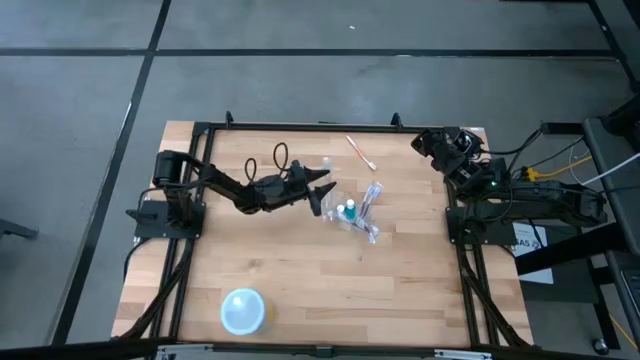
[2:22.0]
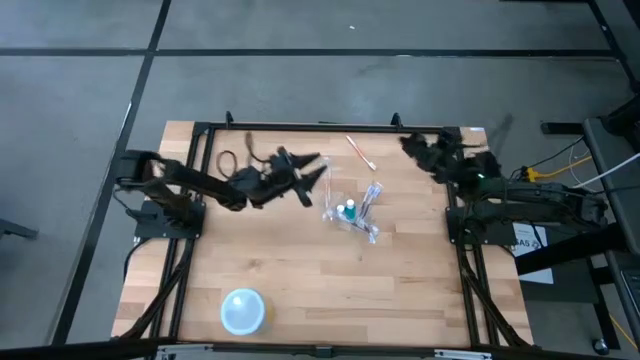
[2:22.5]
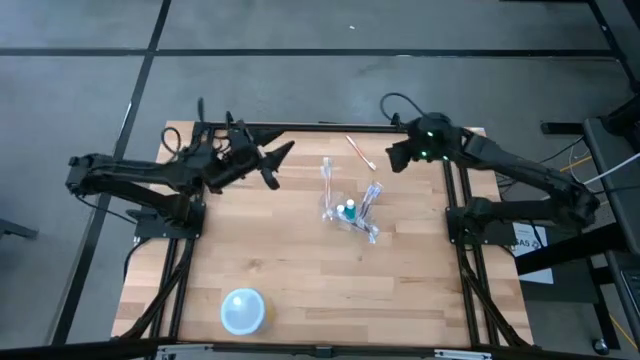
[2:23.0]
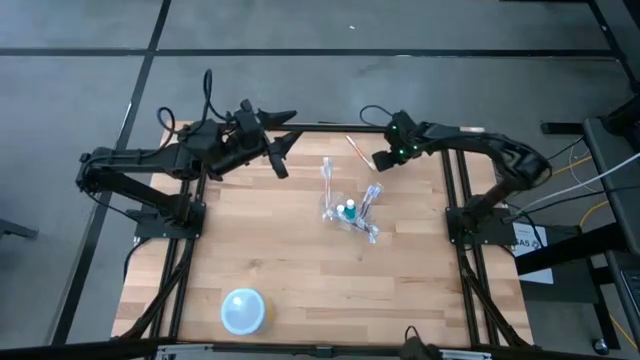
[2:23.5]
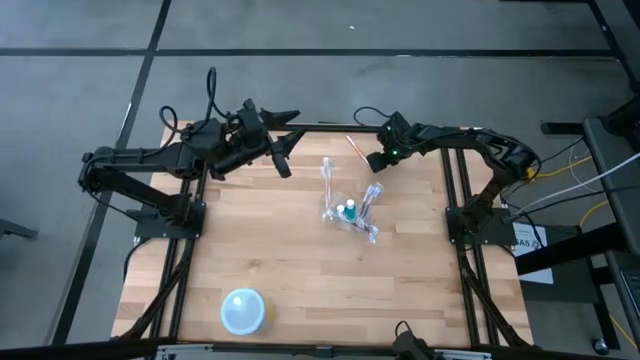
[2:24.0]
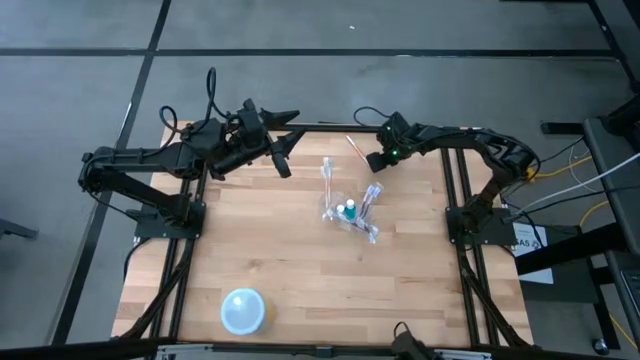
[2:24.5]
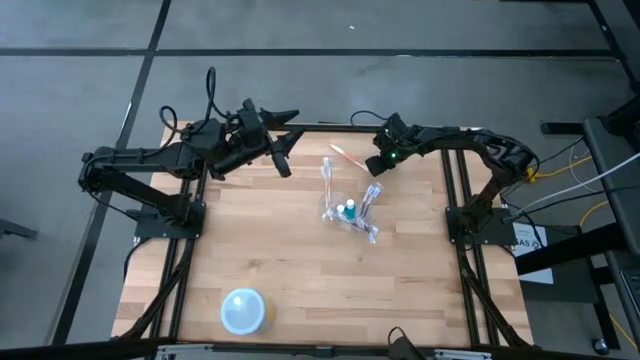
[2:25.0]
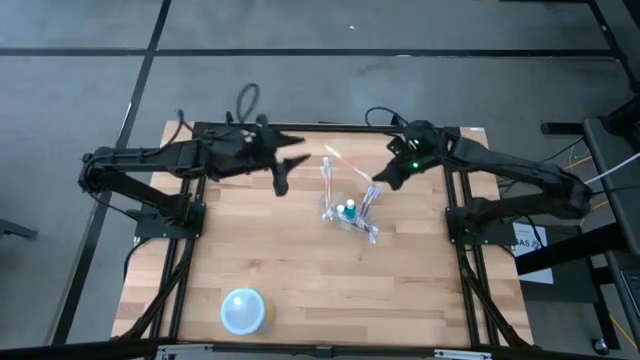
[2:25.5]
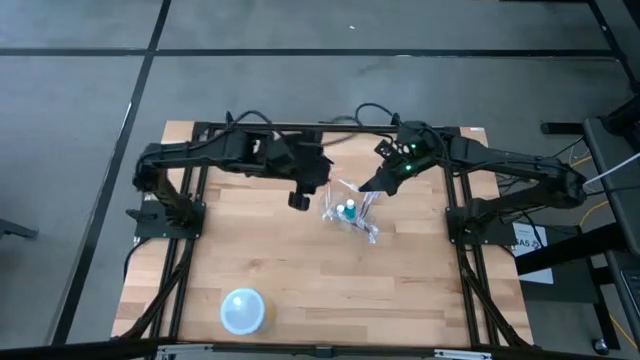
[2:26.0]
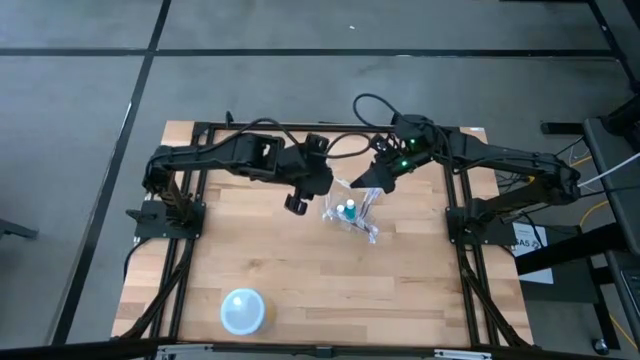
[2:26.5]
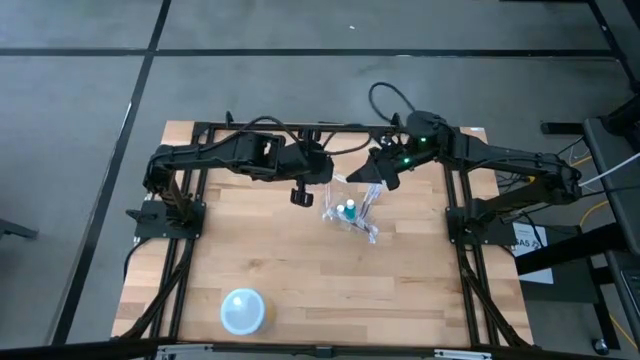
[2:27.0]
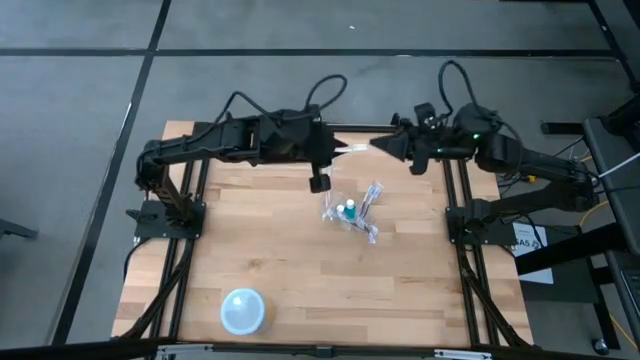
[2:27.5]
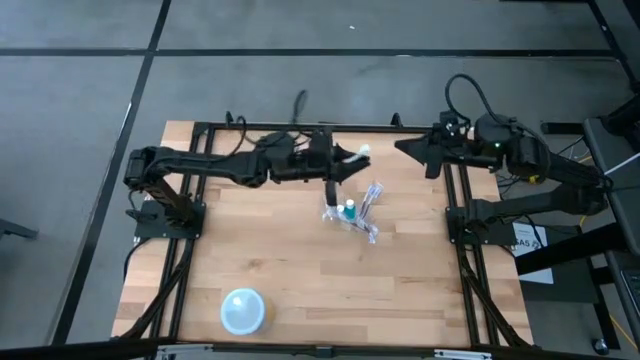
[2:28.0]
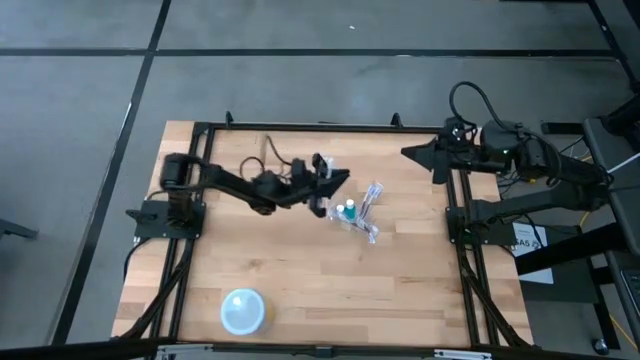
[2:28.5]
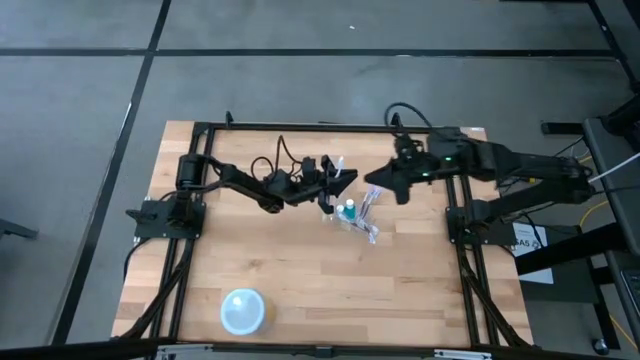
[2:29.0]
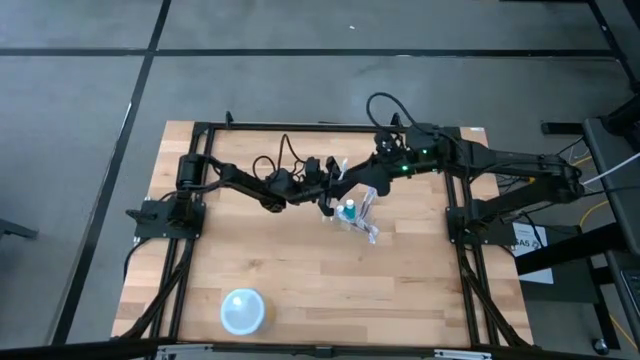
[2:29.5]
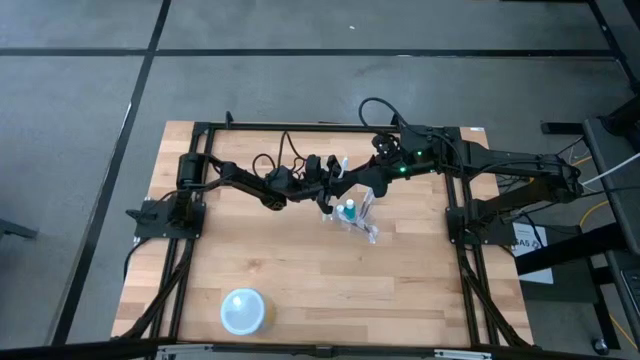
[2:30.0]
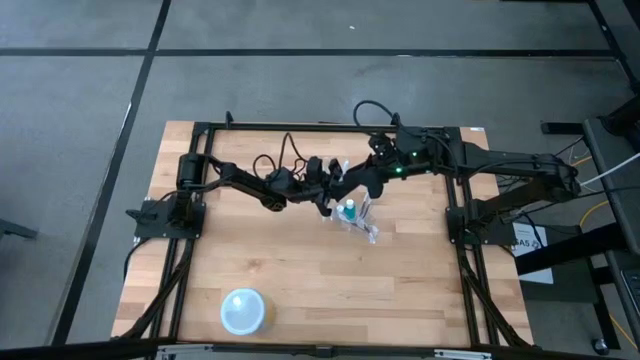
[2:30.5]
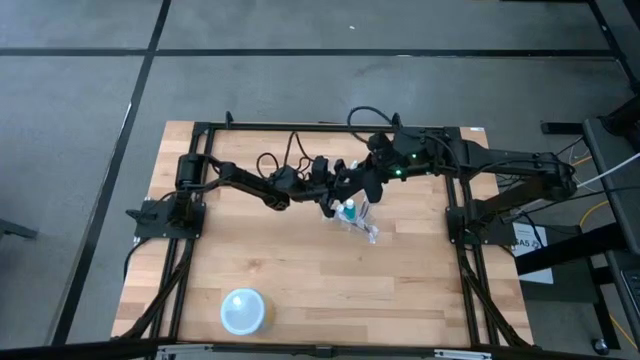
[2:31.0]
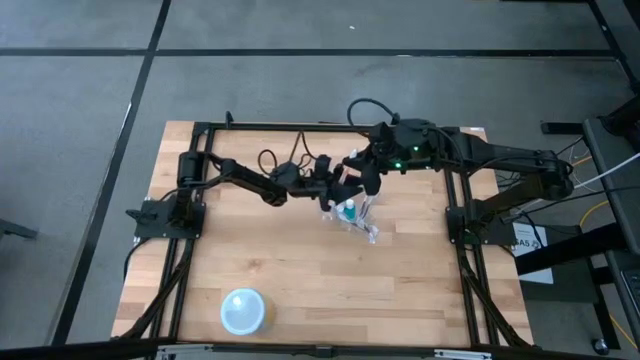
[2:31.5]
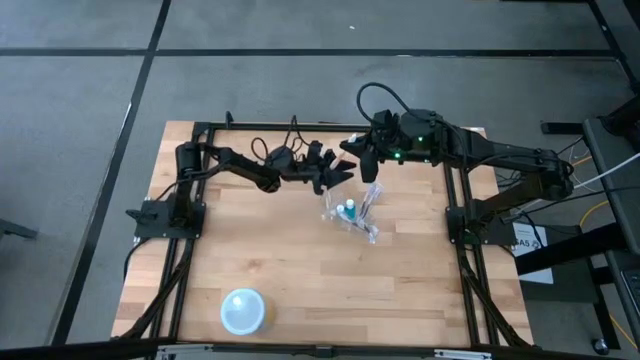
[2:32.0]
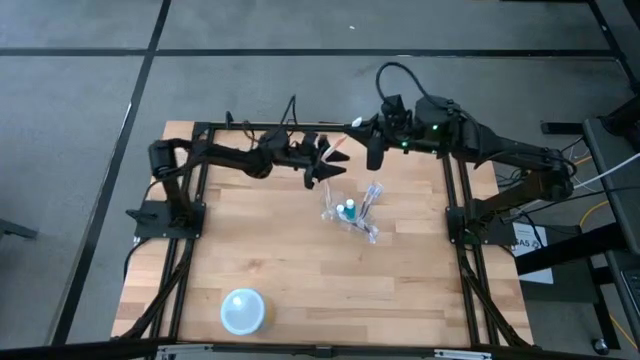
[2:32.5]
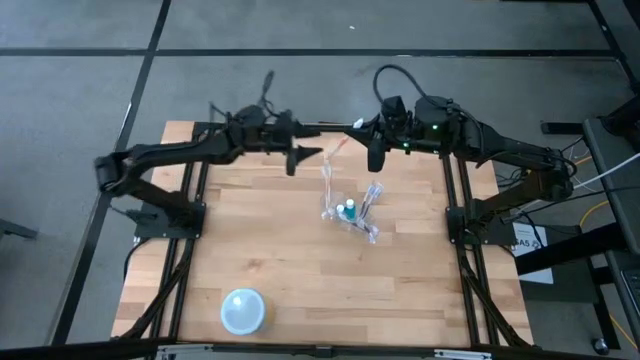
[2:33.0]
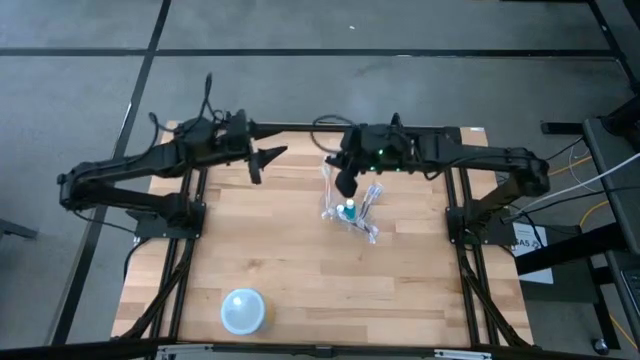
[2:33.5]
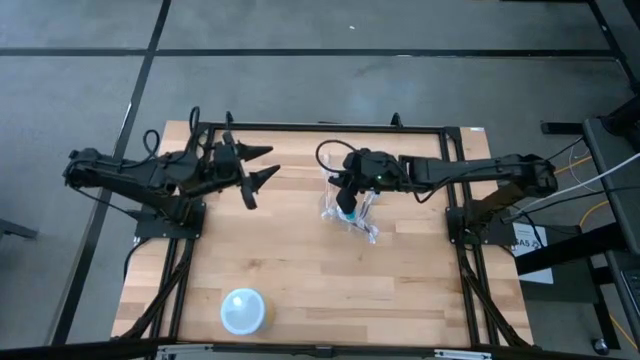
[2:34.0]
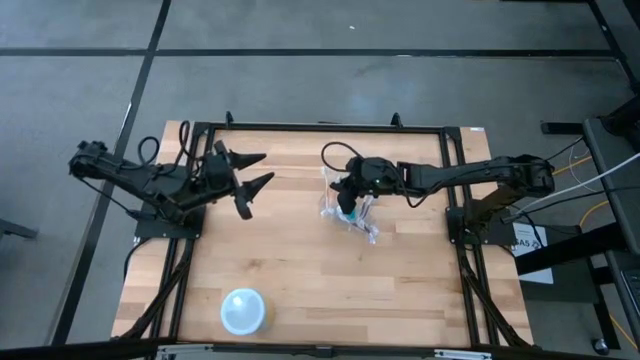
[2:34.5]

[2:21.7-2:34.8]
Task: Pick & Place toothbrushing station
Put the orange toothbrush into the transparent organizer

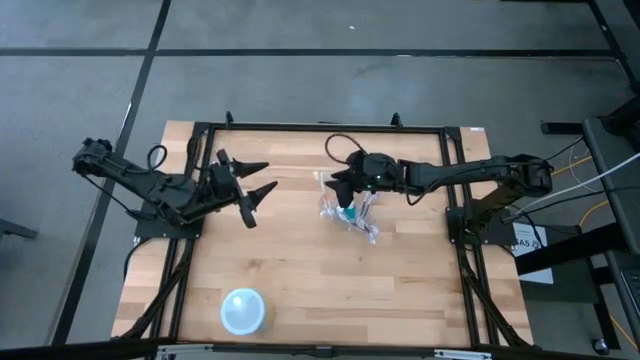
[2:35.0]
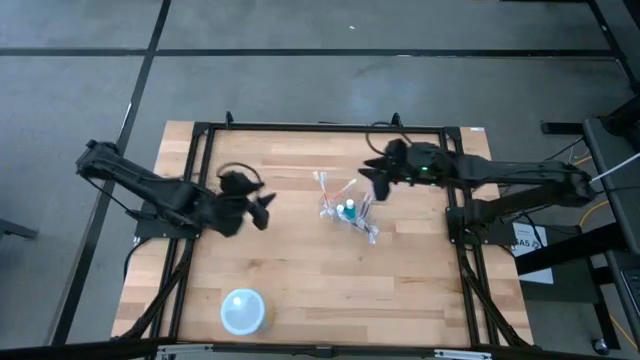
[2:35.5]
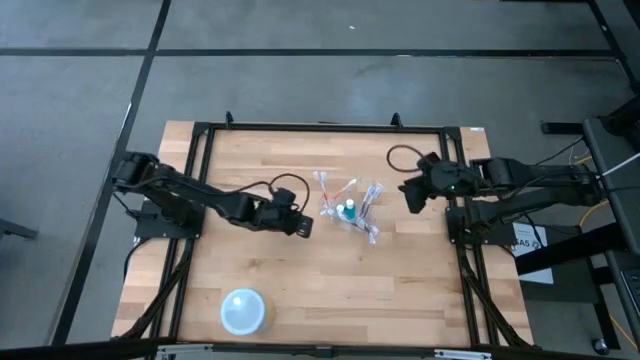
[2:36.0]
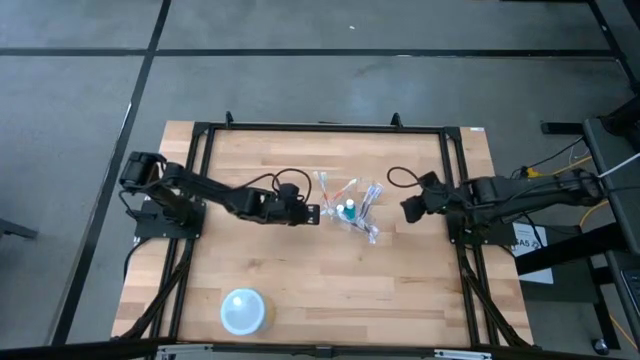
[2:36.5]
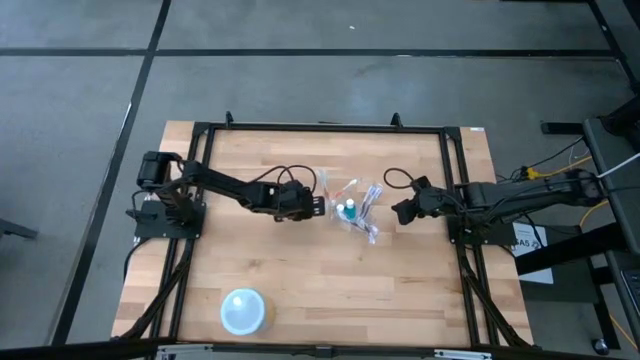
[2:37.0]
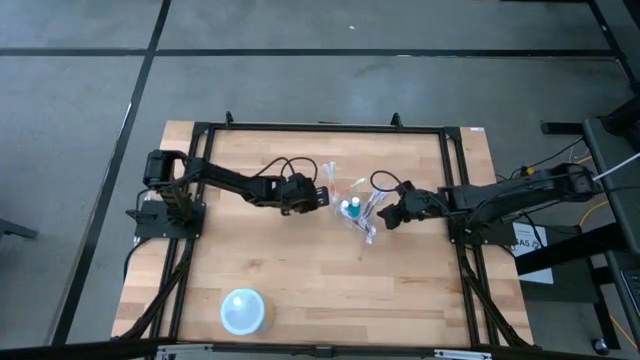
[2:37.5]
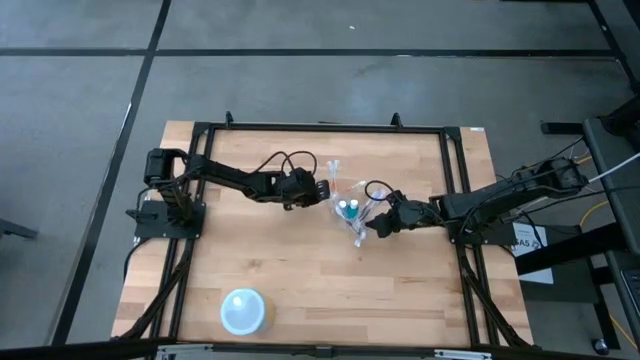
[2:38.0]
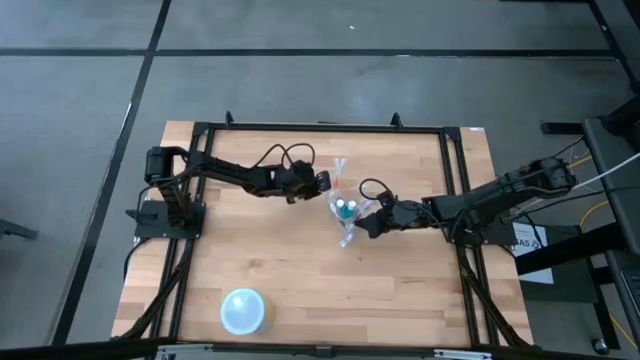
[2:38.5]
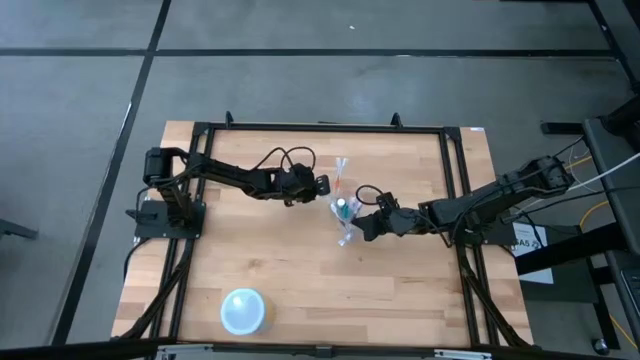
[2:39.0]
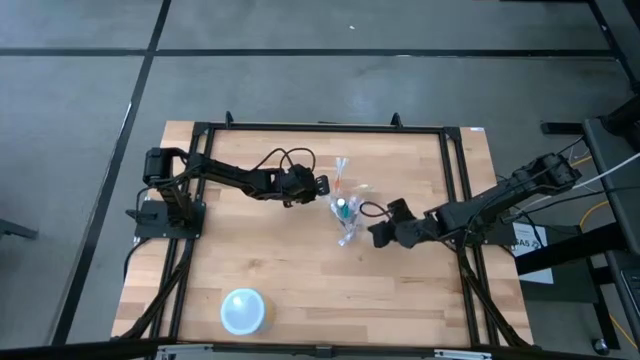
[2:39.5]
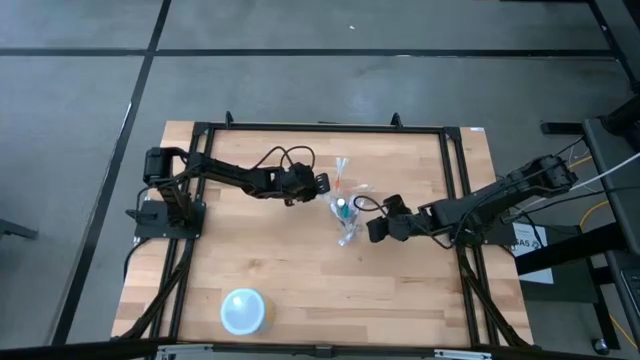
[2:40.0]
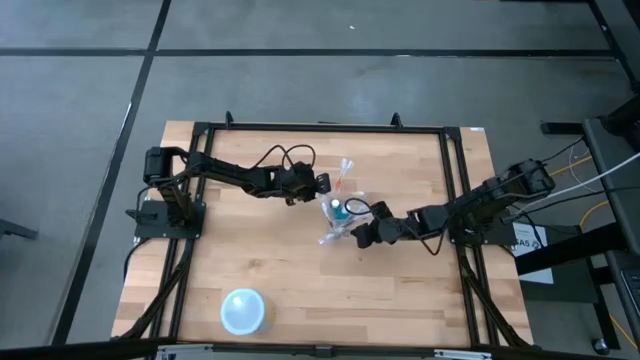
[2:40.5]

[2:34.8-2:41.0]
Adjust the transparent organizer on the table
